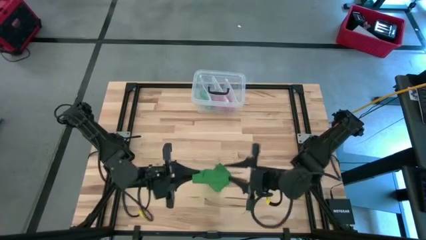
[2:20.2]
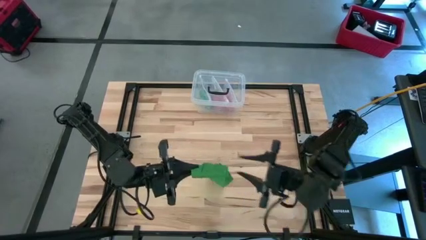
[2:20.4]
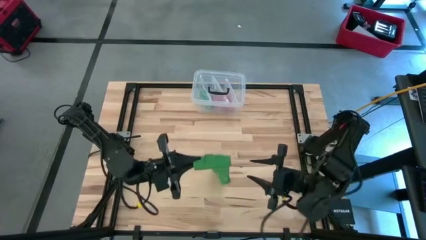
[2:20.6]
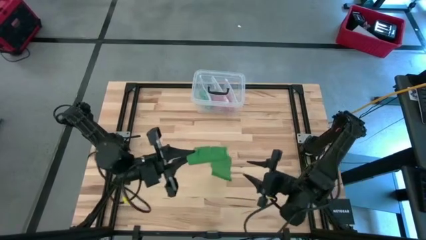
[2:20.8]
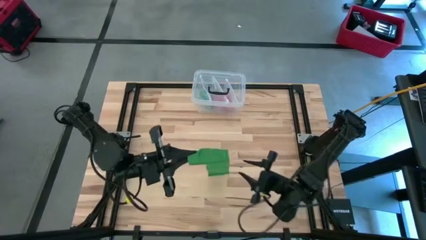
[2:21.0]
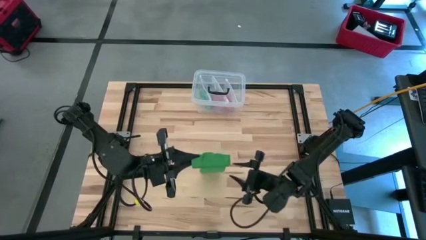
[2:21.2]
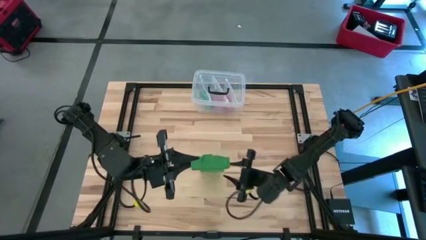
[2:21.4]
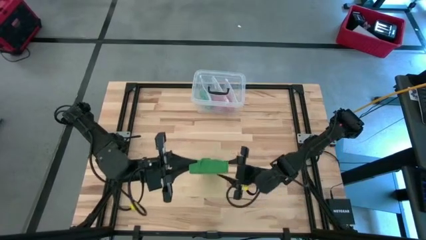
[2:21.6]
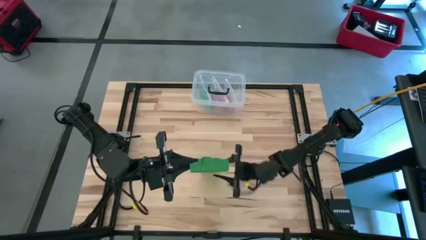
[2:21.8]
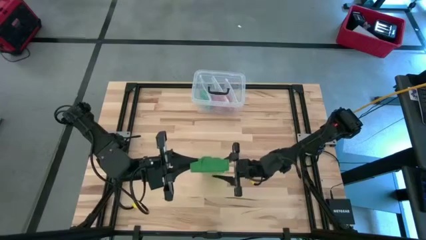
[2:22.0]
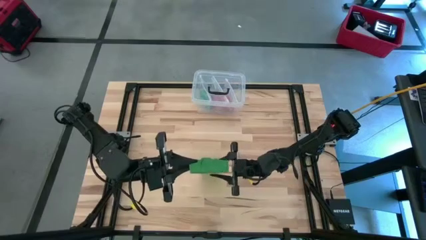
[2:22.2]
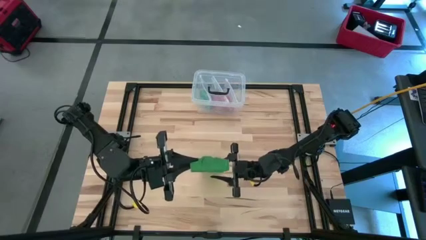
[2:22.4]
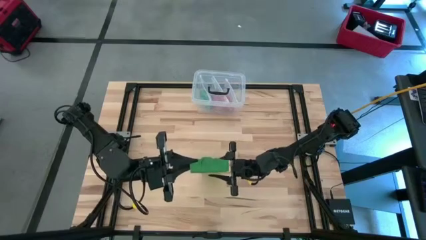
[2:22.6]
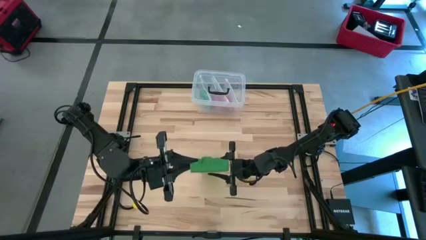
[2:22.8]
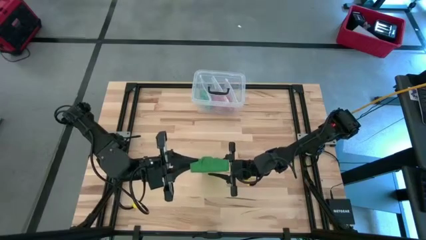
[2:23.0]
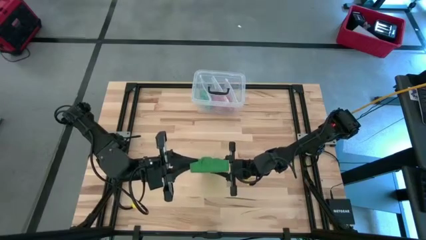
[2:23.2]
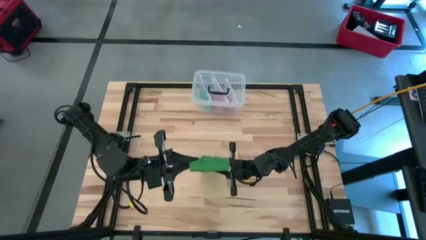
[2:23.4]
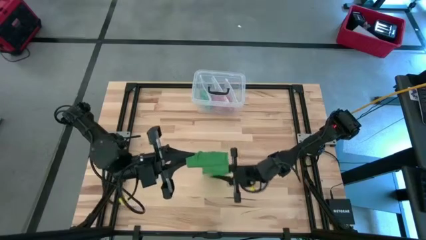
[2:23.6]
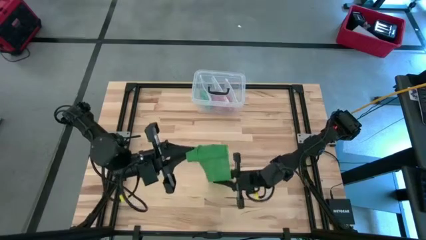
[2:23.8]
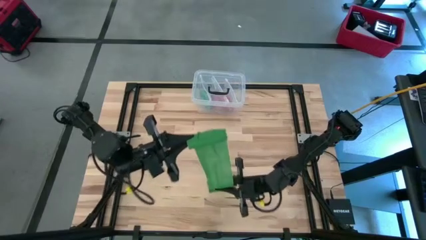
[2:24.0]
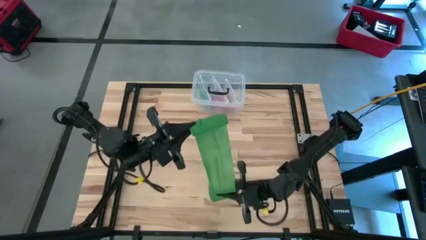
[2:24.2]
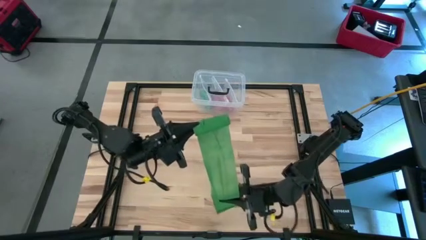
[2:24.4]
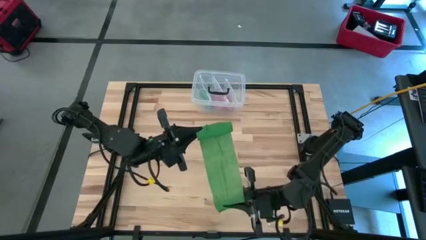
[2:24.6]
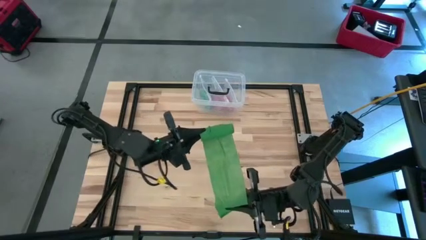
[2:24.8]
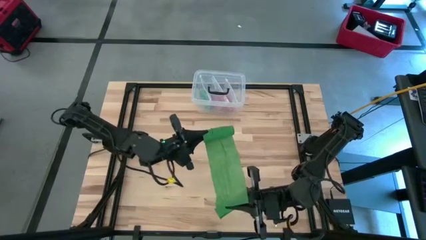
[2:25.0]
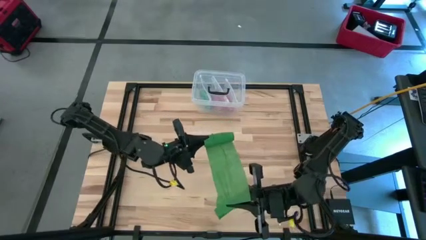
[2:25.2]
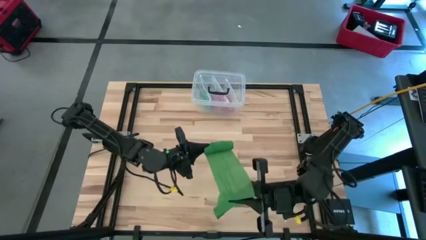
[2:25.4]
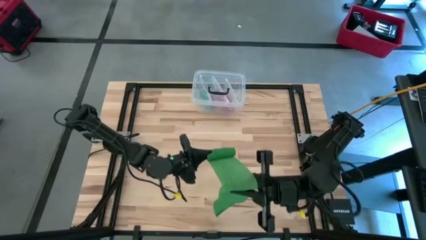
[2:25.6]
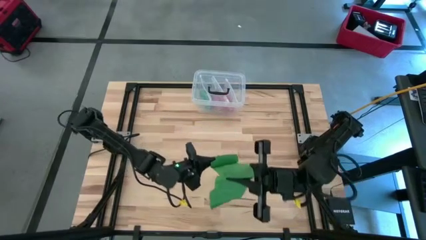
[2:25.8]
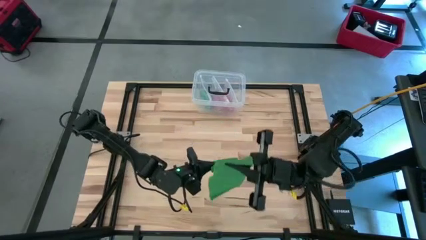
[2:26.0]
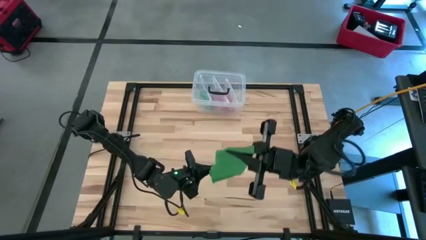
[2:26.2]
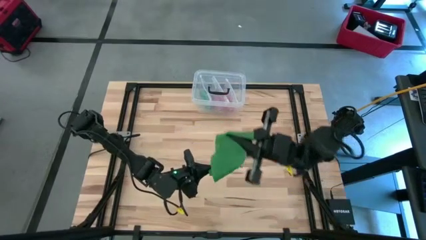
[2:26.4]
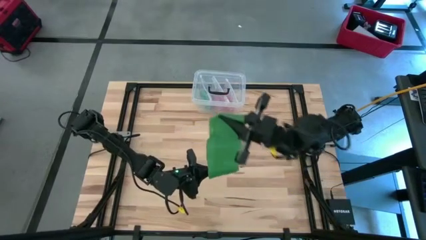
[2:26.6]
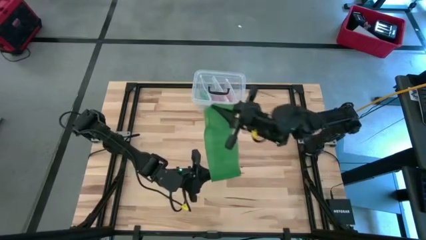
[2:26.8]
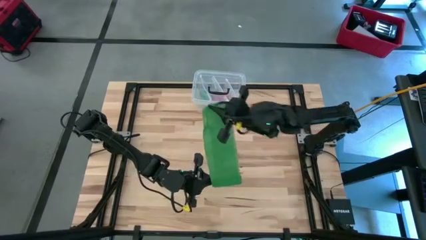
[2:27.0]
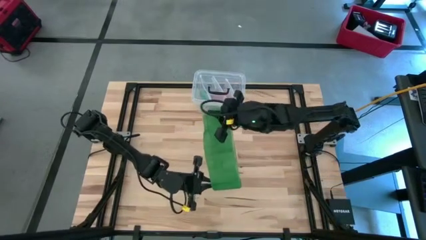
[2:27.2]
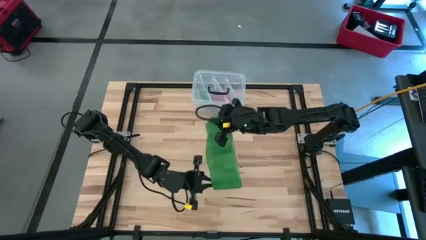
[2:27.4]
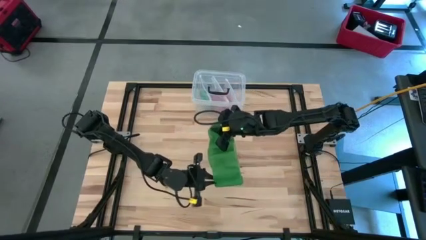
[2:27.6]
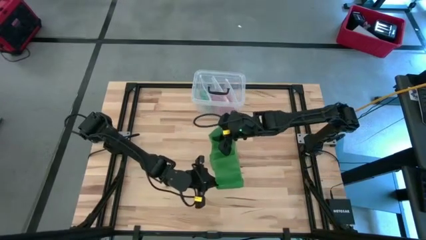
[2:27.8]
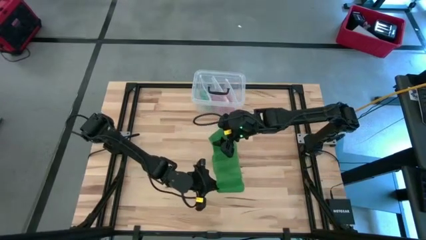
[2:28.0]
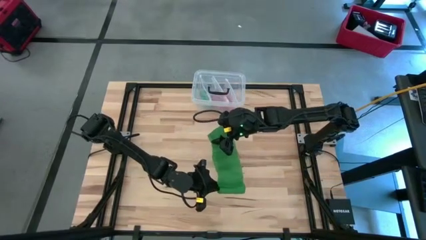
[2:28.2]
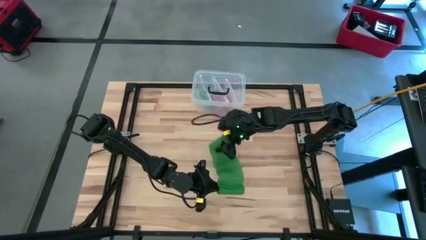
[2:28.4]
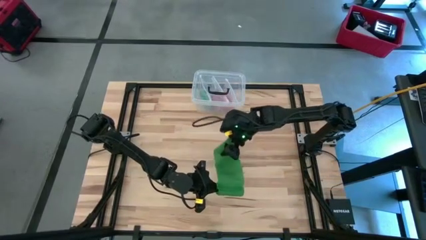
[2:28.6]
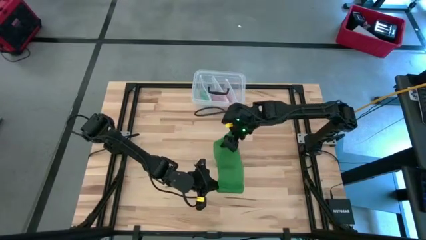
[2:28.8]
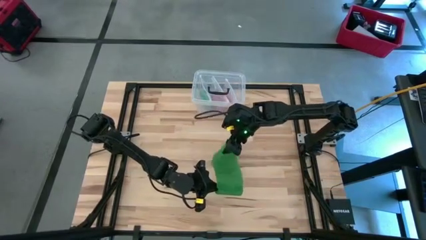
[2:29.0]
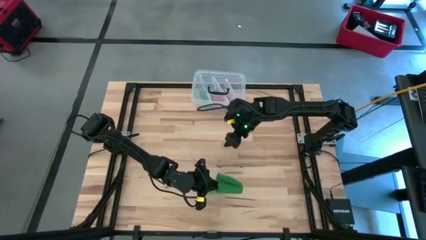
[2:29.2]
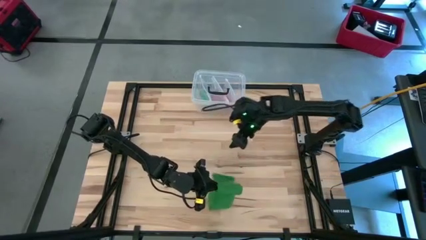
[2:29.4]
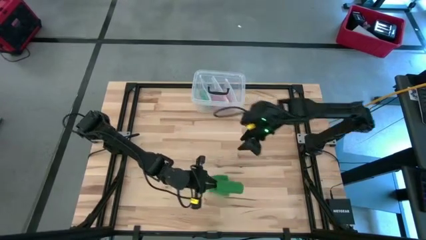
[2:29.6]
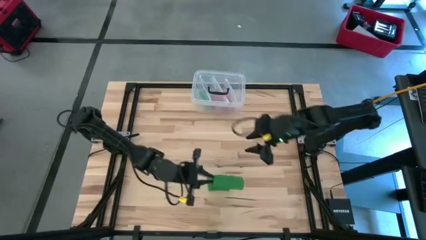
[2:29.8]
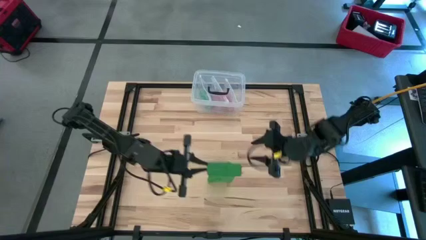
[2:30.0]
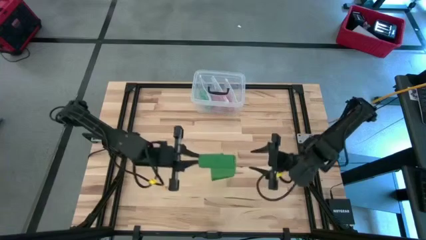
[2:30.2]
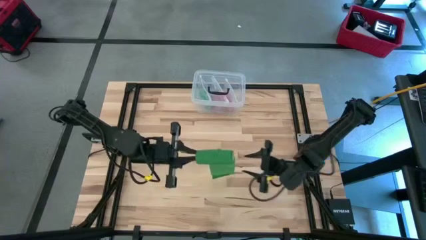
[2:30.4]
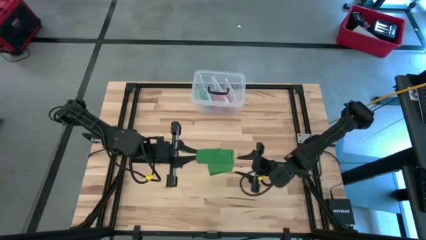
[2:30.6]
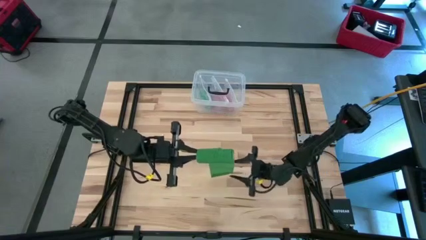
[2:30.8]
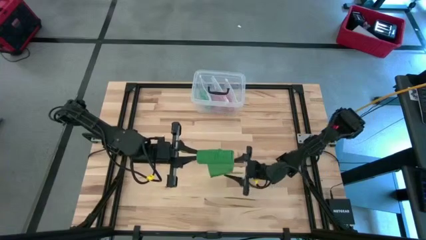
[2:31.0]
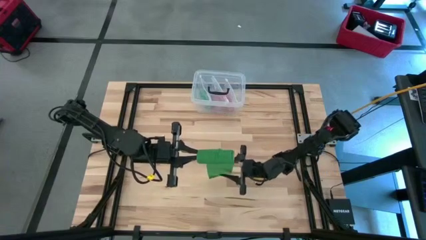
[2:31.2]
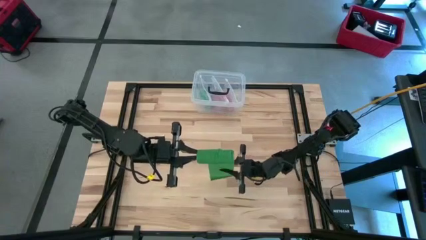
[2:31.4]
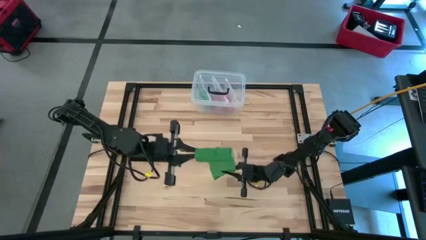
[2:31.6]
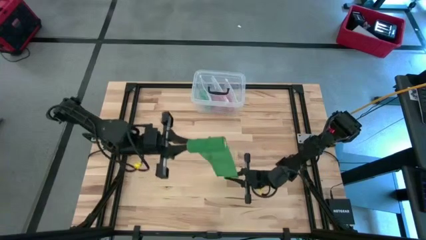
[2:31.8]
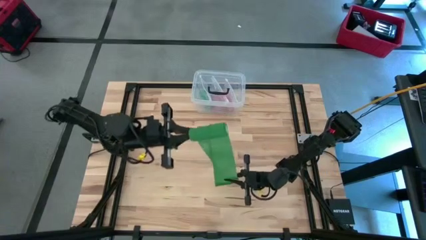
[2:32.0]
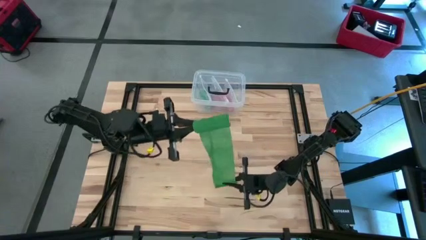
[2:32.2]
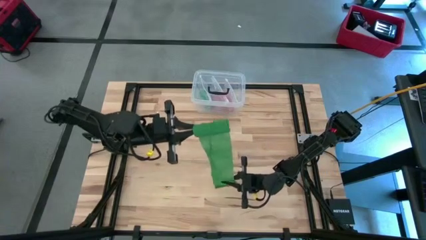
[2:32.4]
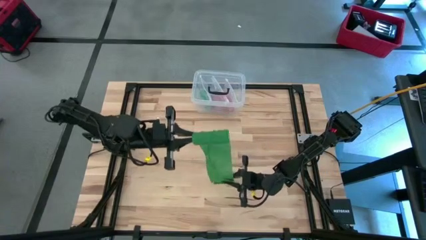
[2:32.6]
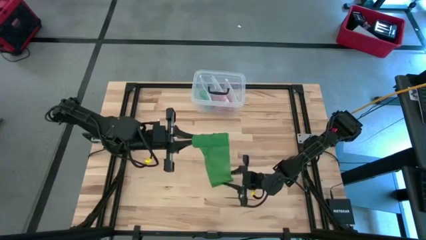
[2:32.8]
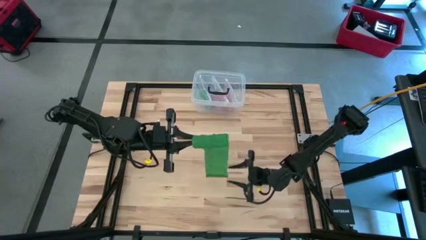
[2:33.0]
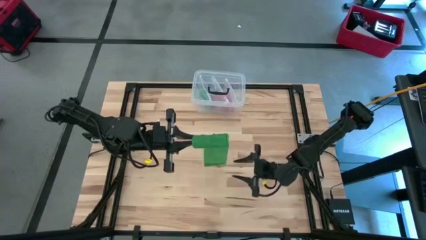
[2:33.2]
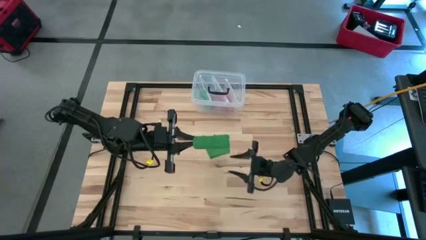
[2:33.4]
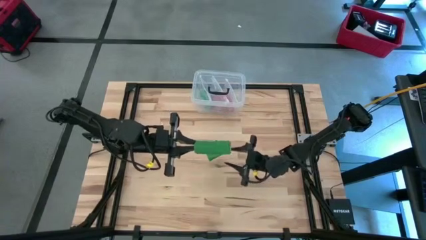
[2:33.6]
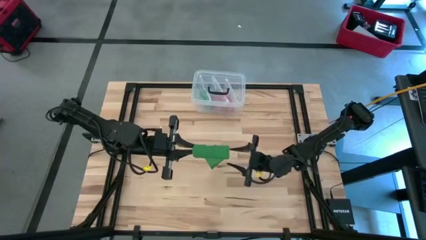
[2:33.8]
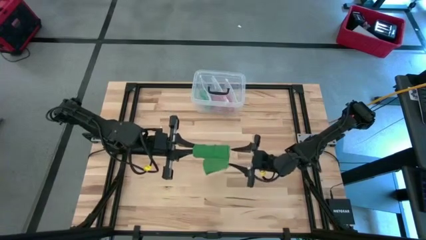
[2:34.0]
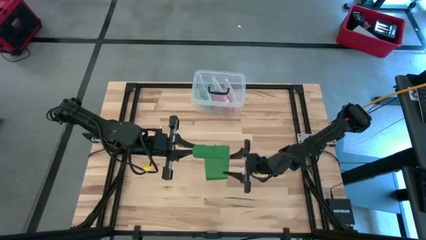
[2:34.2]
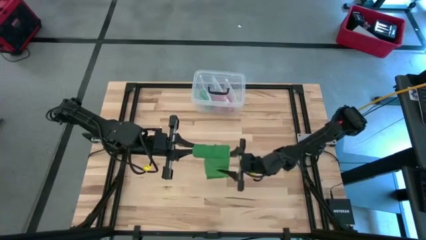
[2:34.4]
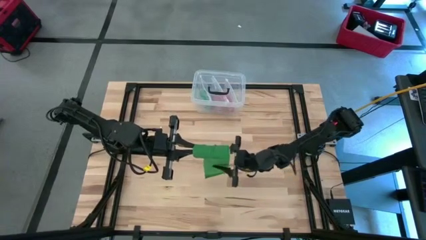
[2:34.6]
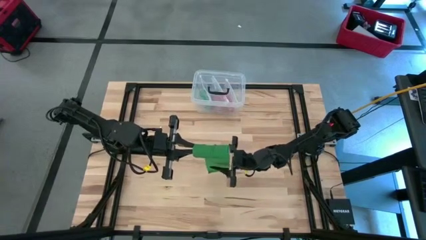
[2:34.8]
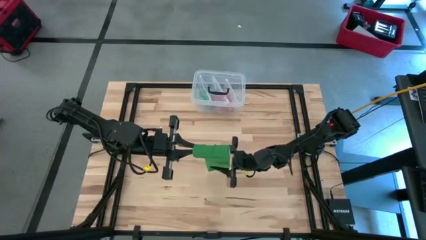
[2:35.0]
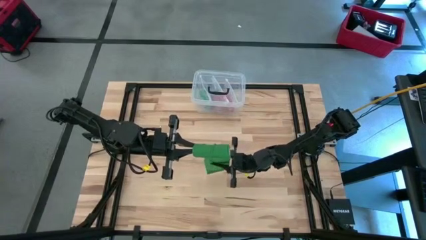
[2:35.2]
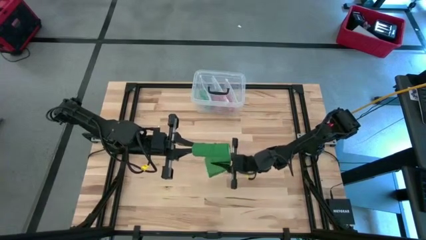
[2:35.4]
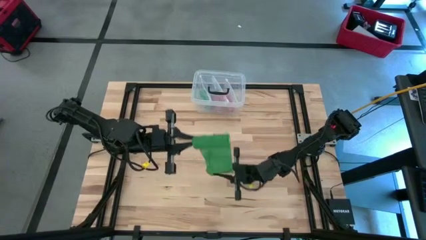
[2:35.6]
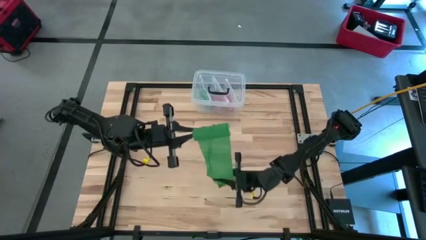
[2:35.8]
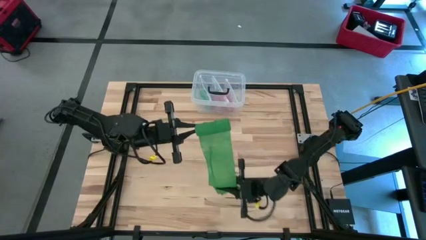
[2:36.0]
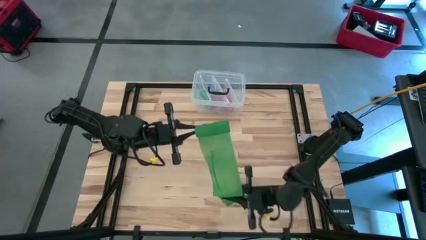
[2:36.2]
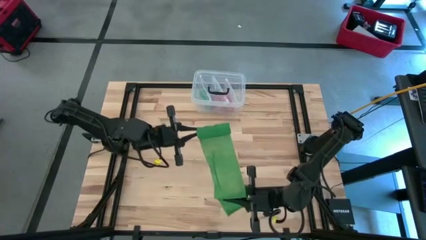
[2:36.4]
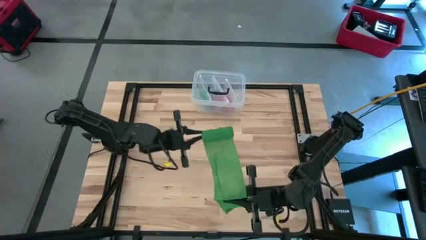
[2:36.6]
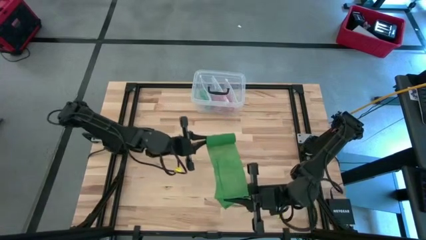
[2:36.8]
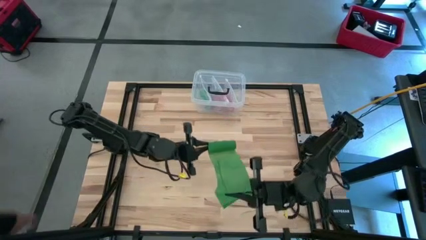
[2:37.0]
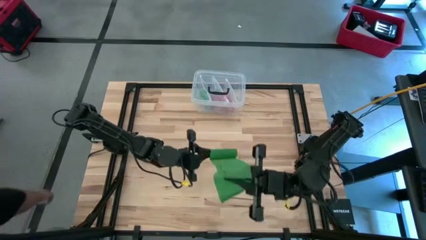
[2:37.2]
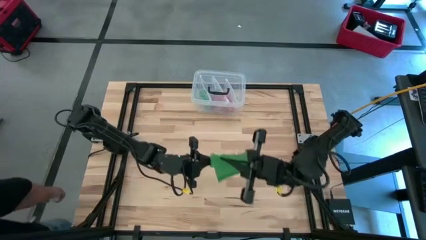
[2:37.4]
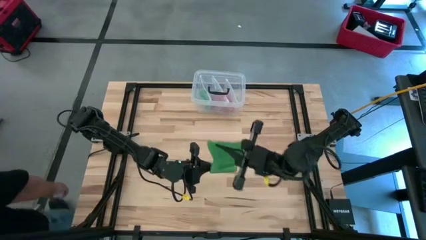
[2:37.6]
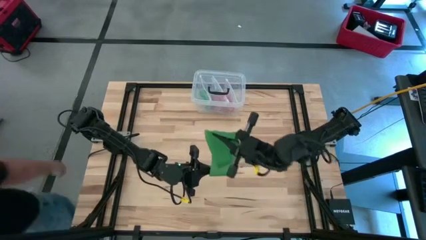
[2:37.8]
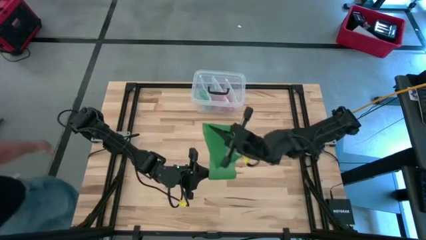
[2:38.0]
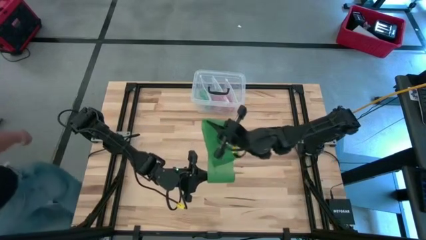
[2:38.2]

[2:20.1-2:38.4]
Task: Roll bandage
Roll the green bandage
